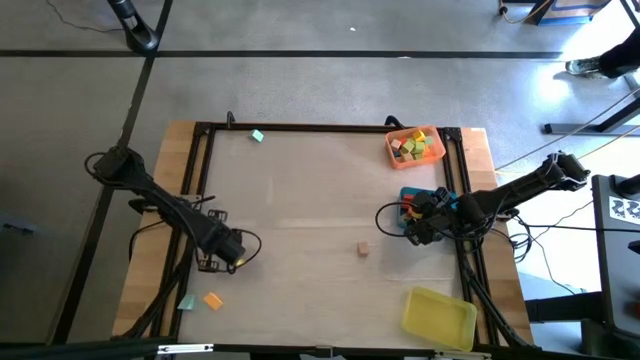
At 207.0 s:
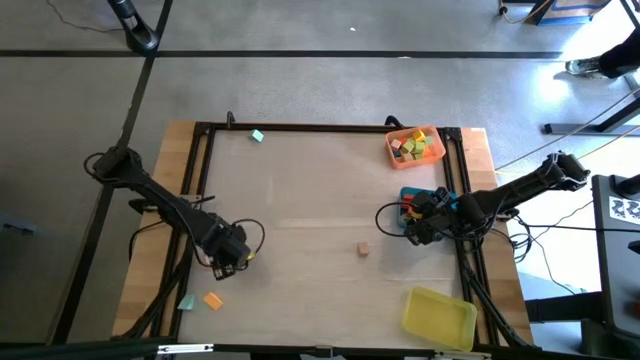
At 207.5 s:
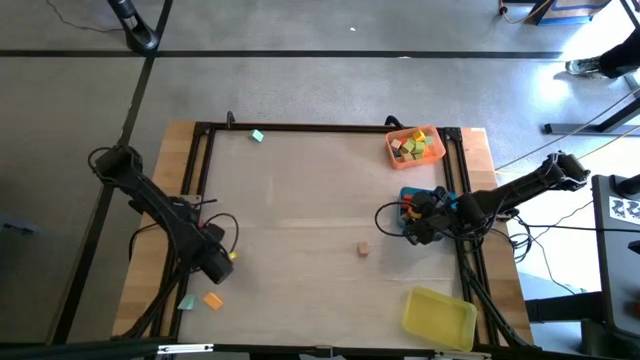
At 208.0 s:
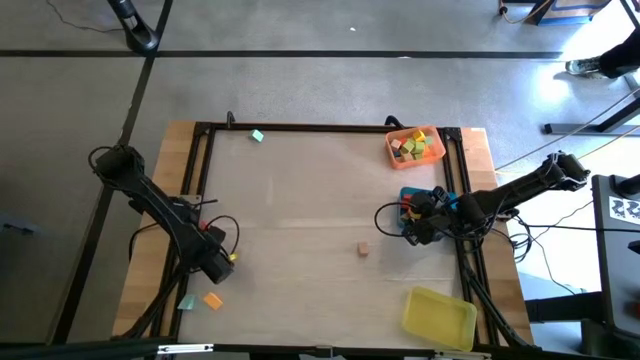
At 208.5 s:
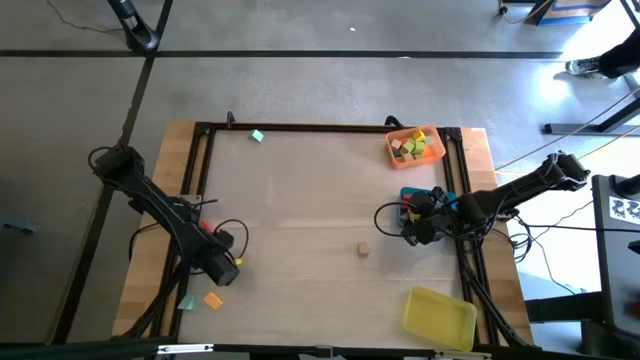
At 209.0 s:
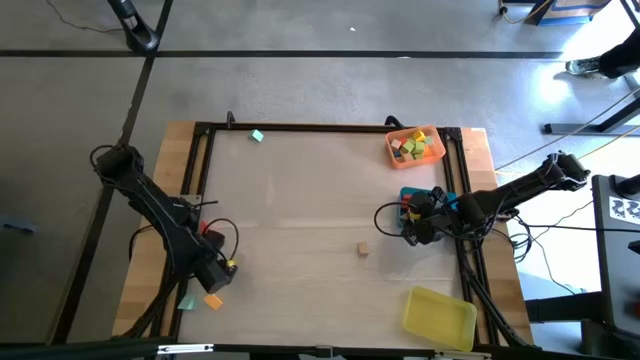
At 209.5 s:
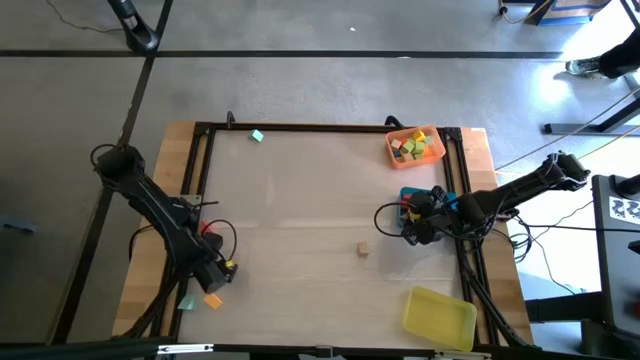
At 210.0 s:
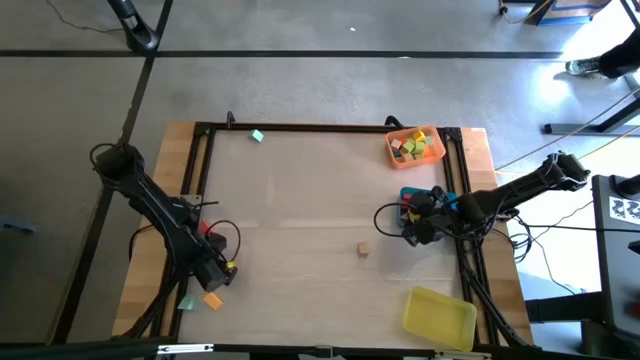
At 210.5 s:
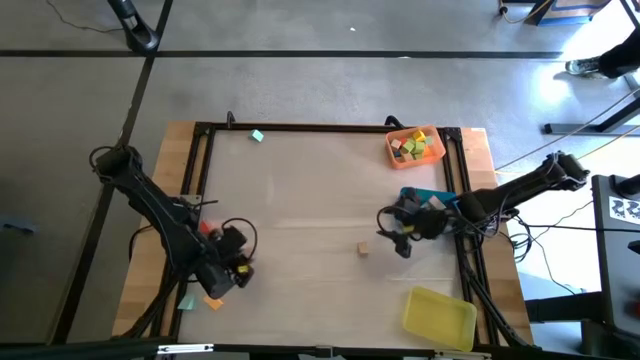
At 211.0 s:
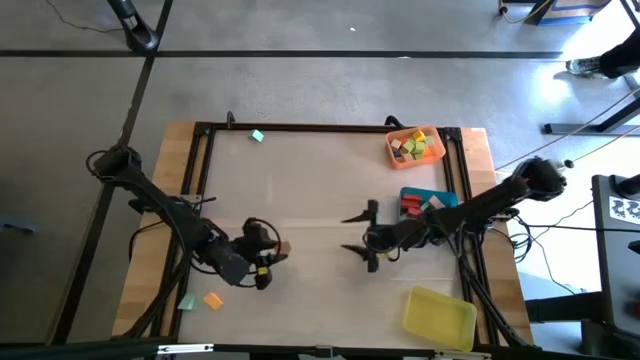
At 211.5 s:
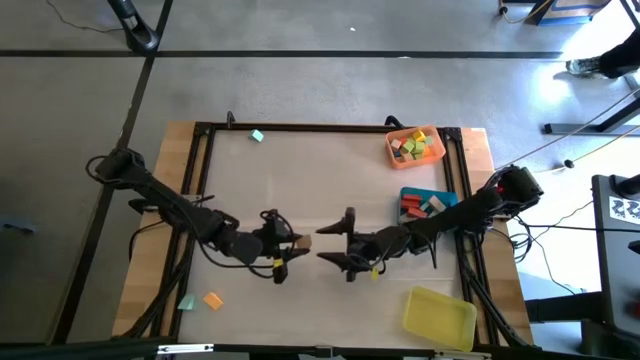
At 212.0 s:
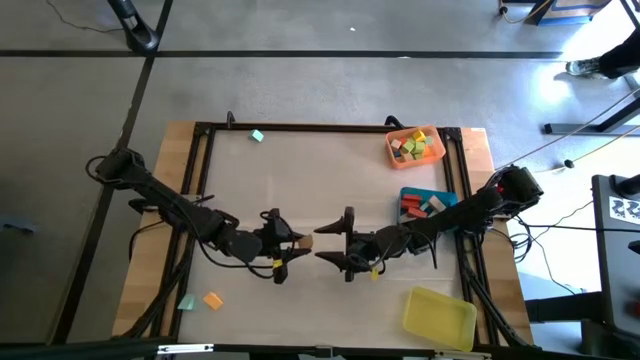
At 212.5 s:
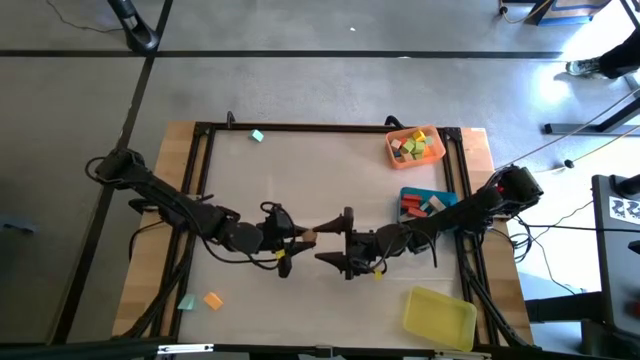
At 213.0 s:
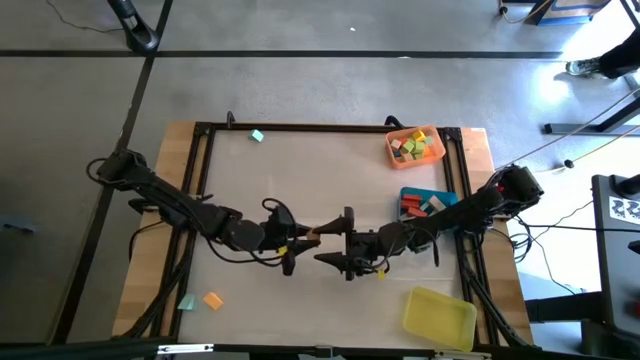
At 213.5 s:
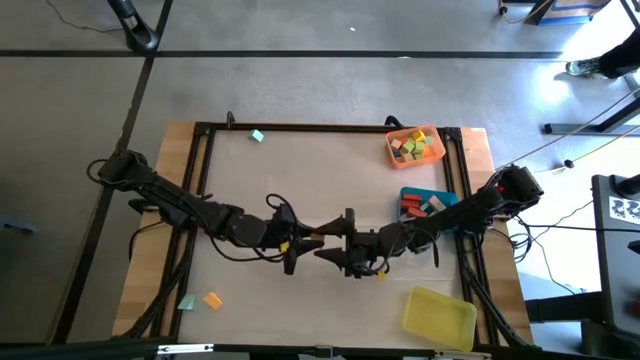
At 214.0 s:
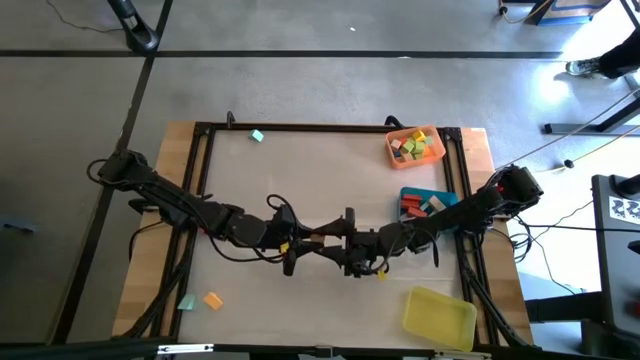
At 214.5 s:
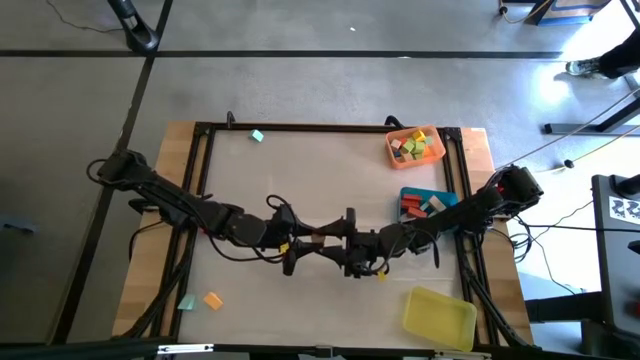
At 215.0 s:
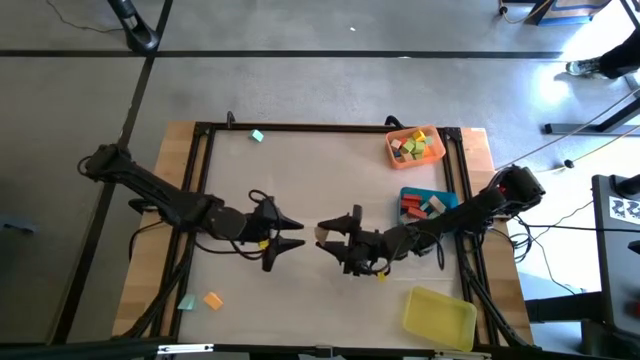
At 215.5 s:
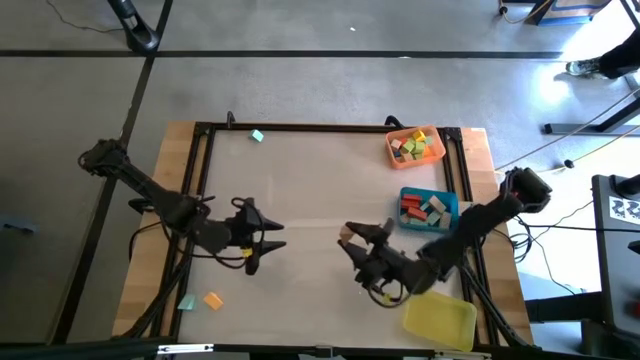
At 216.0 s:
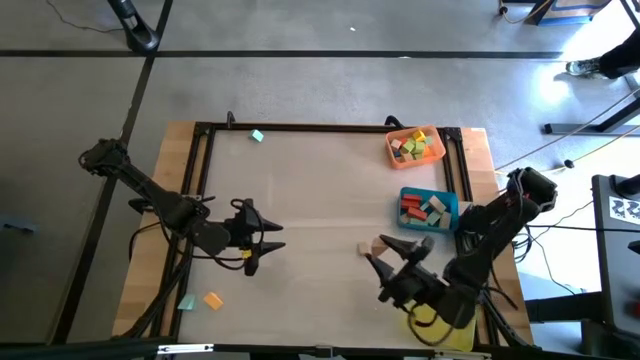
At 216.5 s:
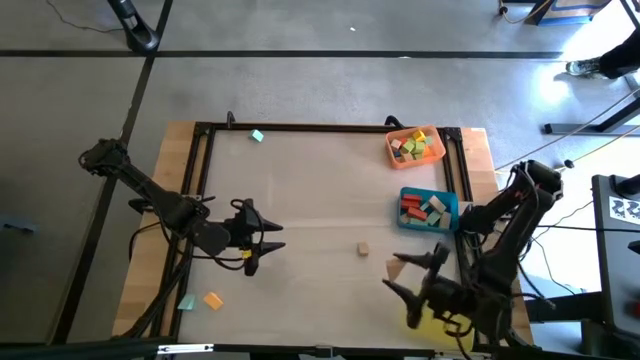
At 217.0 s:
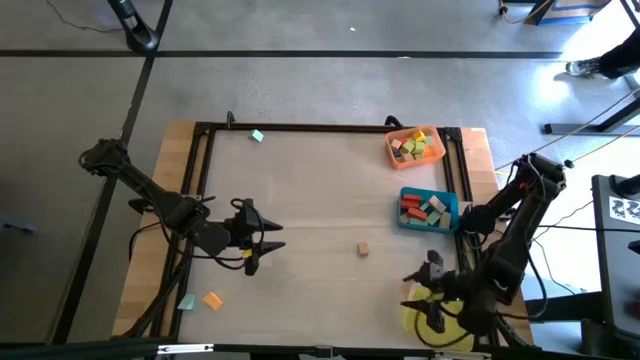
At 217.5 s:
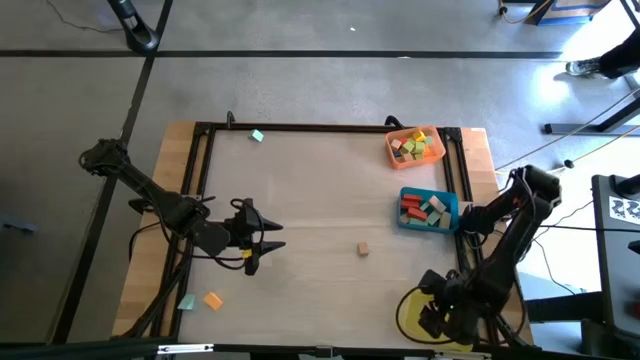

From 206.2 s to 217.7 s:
Task: Sort blocks by size
Put the brown triangular block into the yellow bin

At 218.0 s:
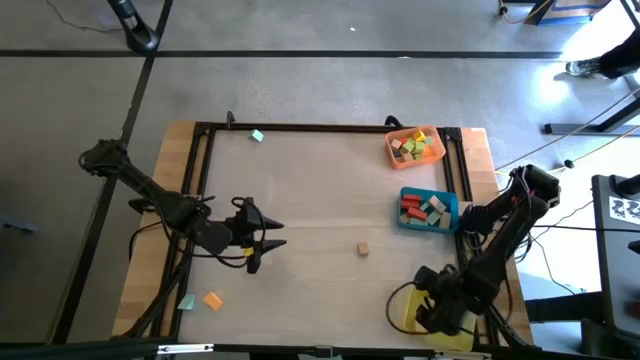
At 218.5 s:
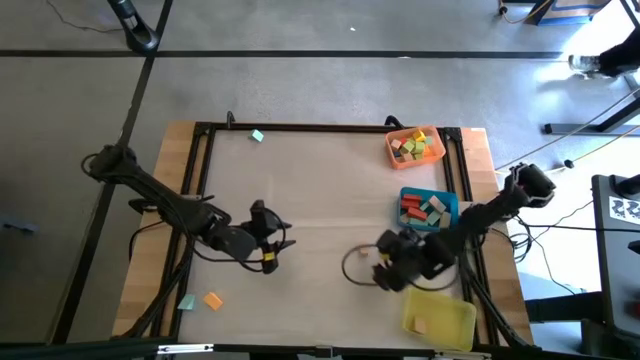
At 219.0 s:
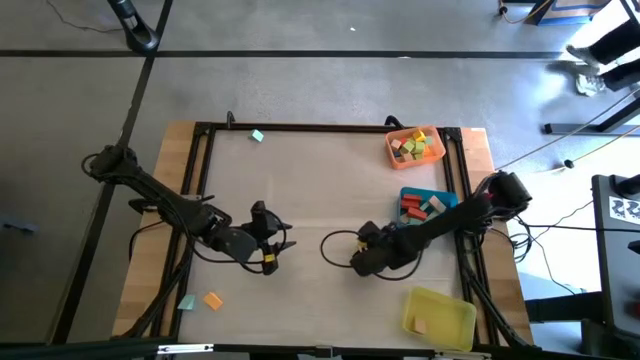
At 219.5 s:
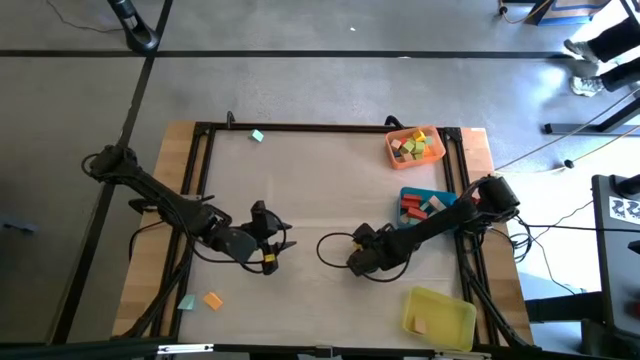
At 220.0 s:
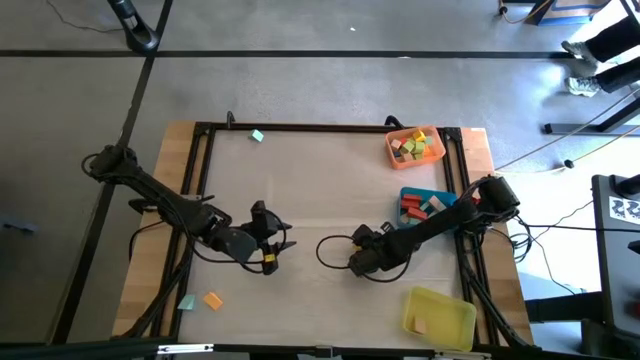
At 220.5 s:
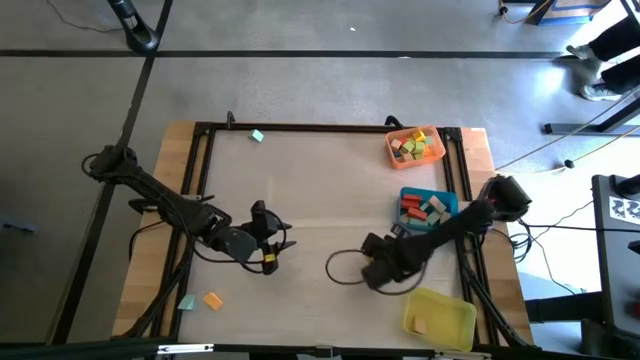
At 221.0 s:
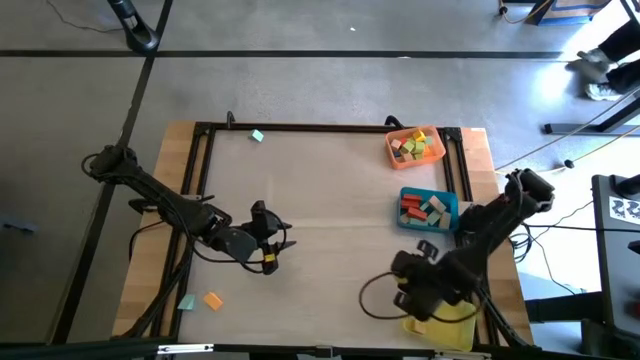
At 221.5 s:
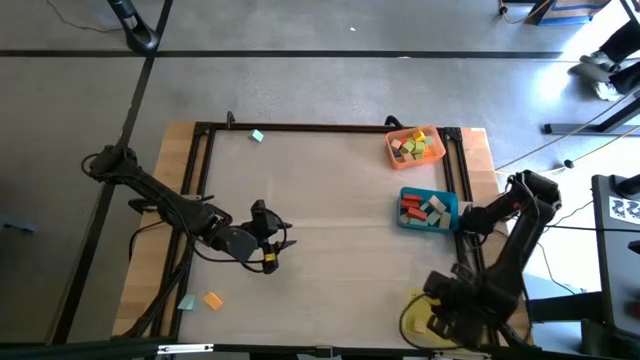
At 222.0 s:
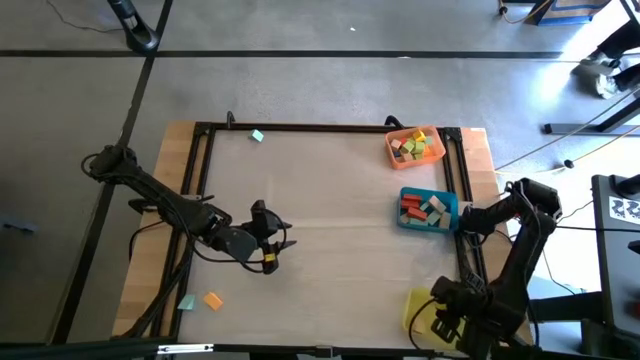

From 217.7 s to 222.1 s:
Put the brown triangular block into the yellow bin

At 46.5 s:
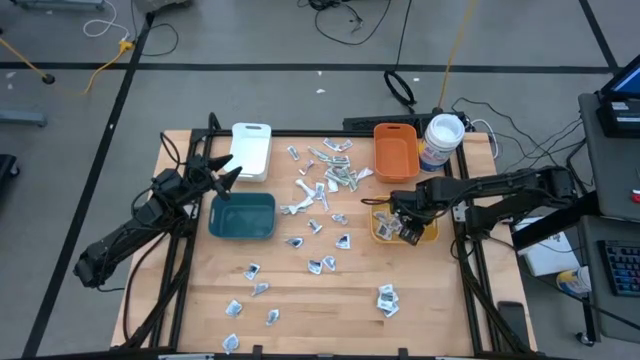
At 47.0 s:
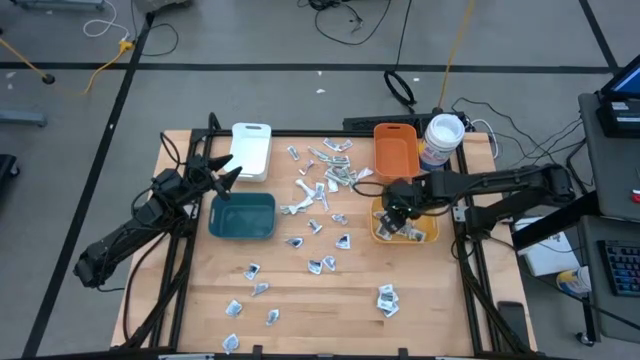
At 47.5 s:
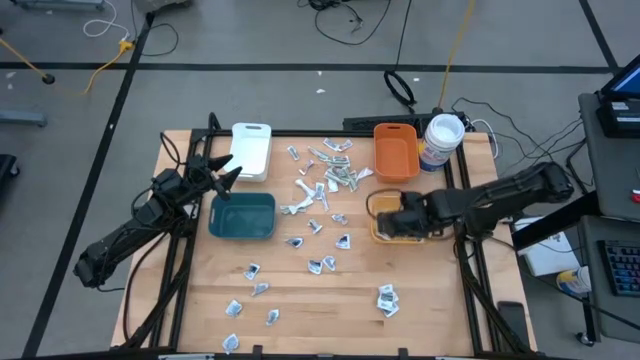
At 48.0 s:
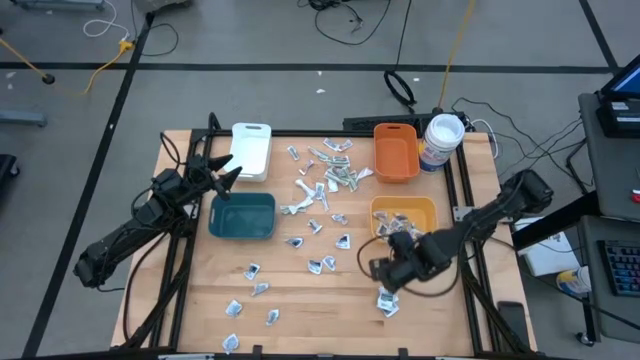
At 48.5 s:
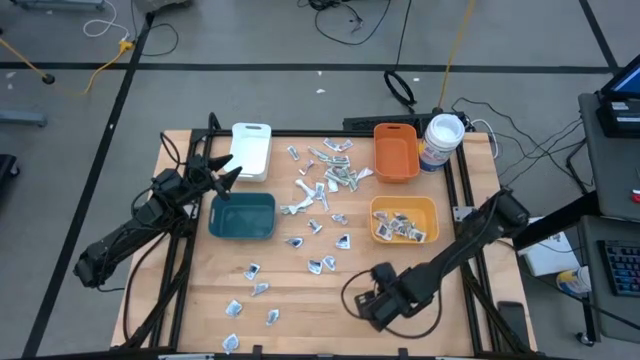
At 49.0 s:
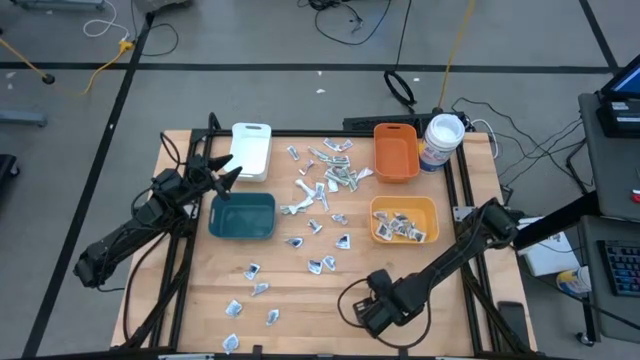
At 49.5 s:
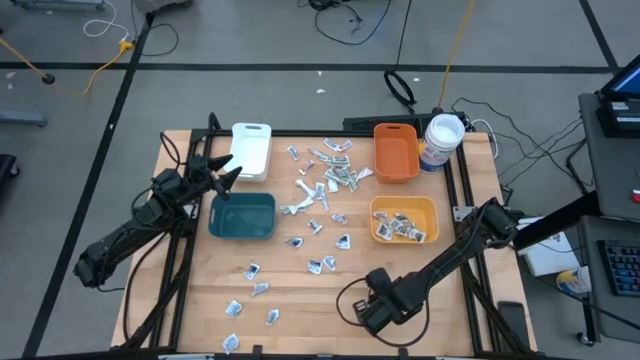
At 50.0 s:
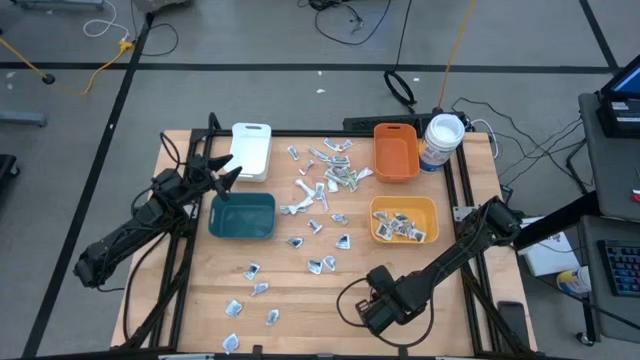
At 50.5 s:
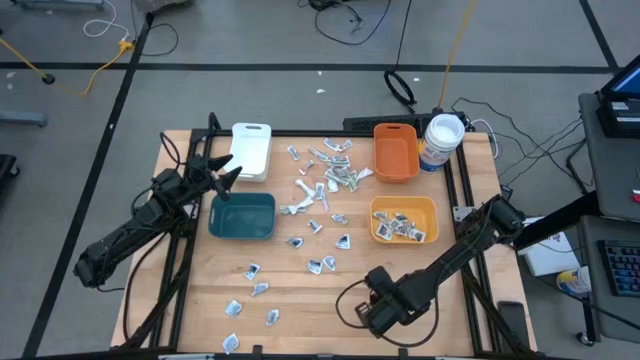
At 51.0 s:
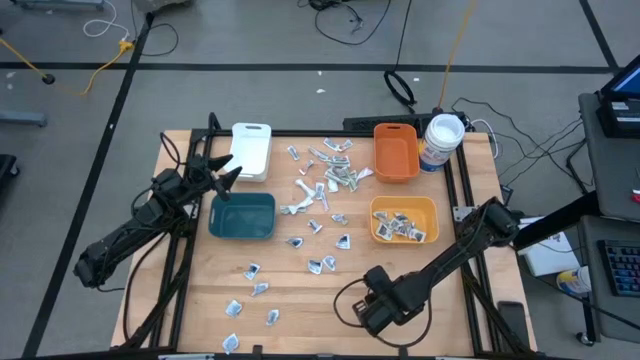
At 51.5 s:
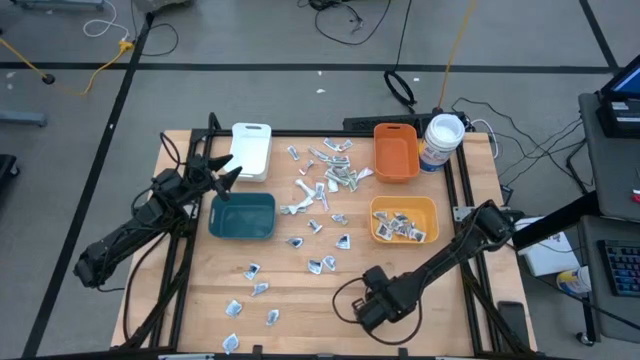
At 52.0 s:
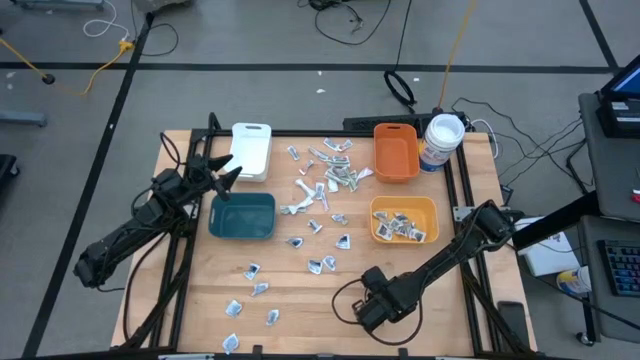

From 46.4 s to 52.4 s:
Task: Pick & Place First Aid Supplies
Put the antiseptic towelette into the yellow bin
